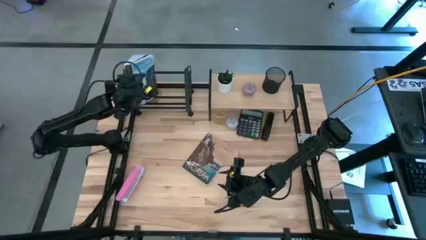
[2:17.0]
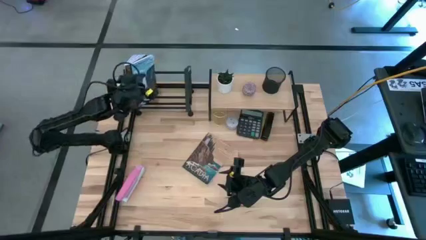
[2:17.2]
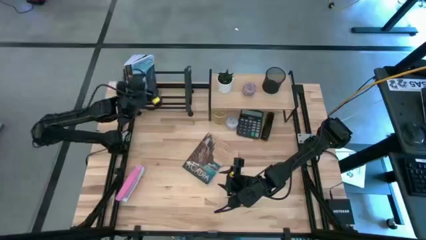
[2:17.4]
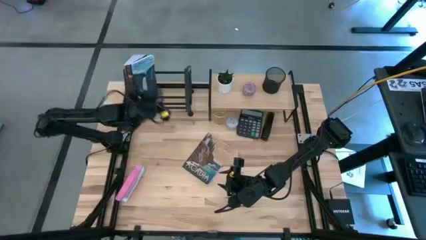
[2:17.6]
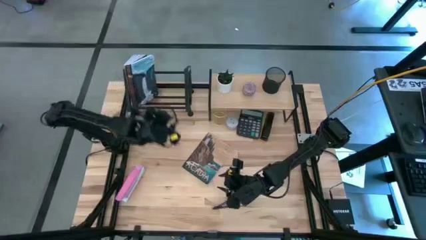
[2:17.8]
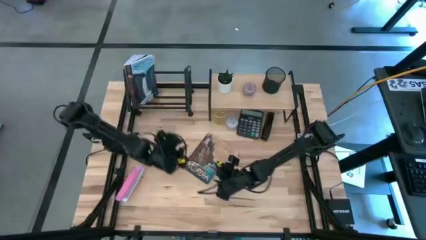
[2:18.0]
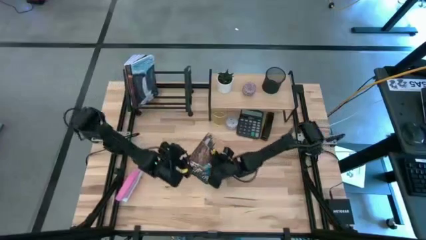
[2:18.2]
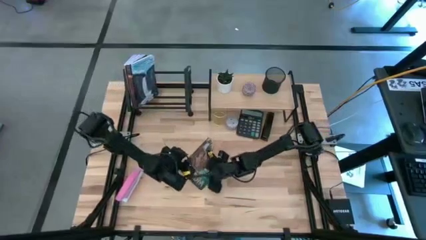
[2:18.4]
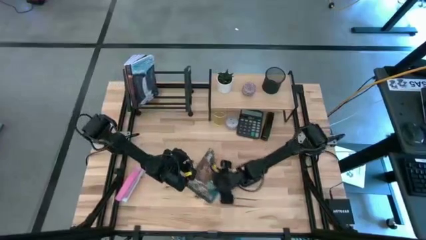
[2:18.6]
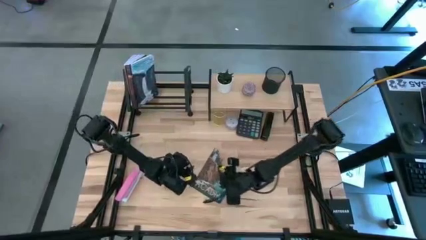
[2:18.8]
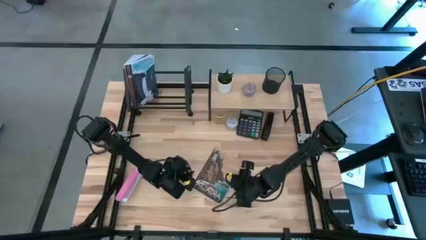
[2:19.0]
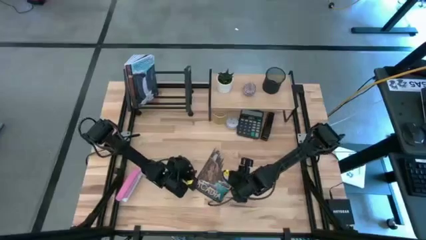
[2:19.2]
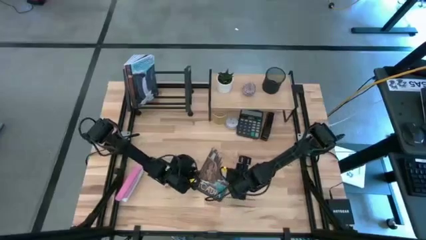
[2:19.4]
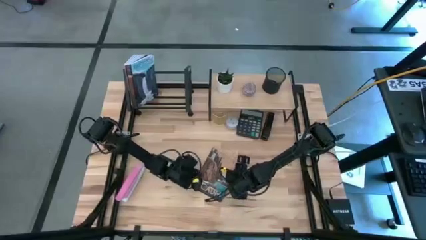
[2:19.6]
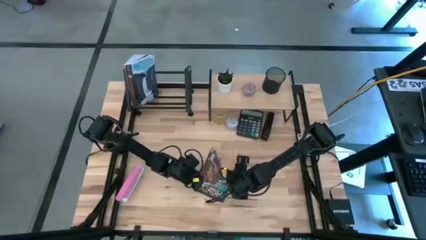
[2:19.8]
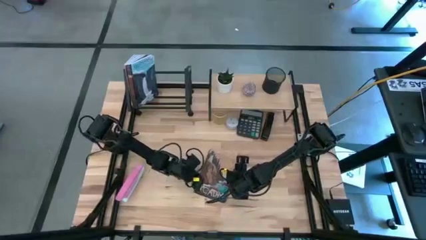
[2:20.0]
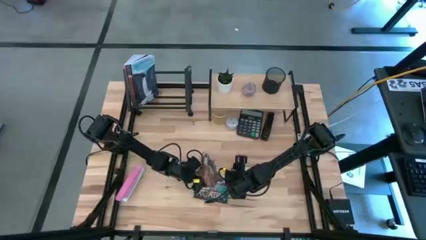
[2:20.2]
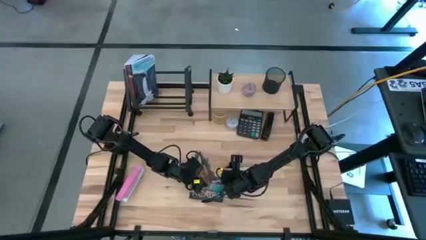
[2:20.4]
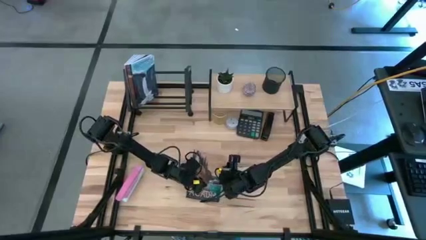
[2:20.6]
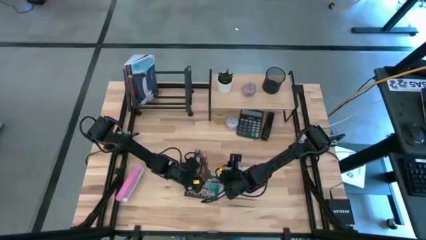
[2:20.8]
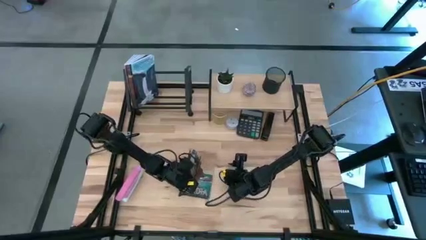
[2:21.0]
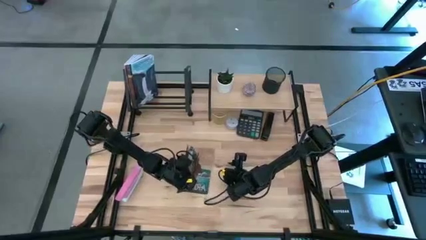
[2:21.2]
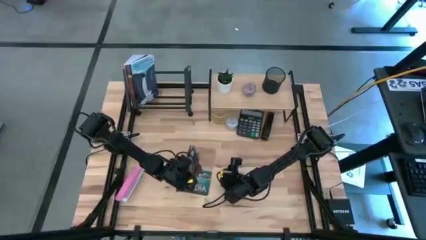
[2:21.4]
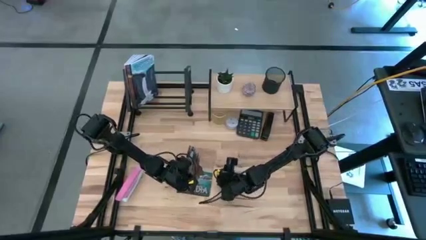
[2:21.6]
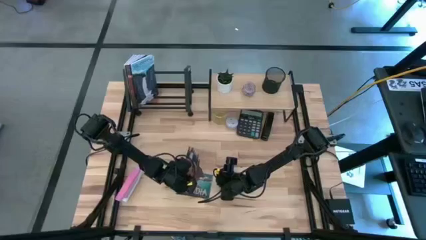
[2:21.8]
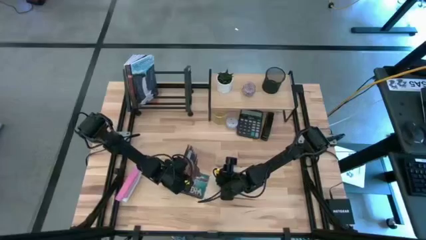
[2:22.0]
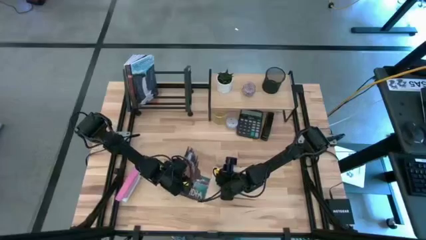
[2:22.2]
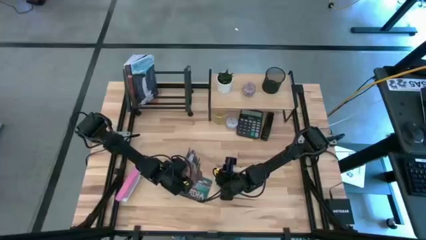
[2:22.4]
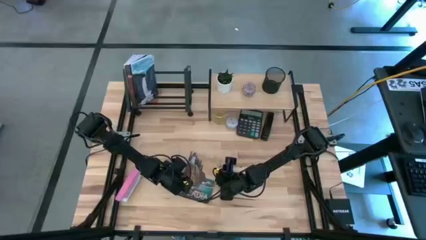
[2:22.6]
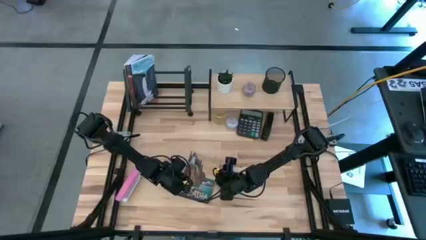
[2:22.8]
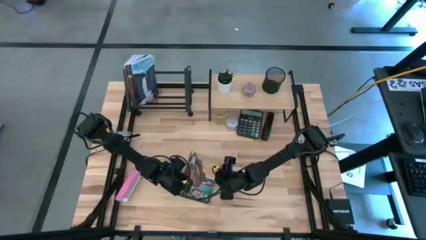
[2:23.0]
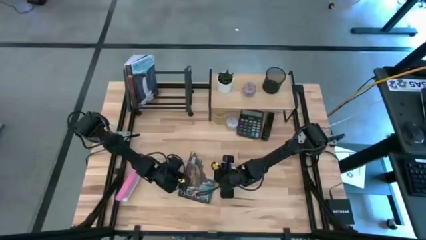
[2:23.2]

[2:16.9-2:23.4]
Task: Stock shelves
Put the brown book into the book holder

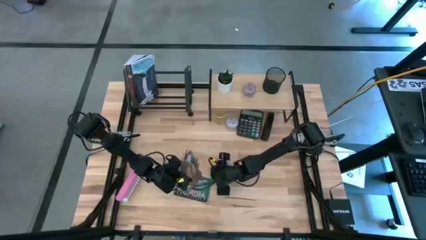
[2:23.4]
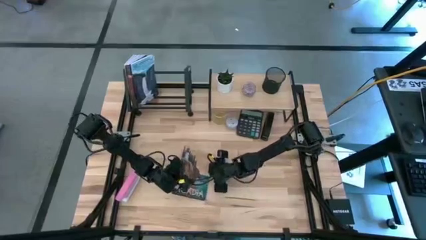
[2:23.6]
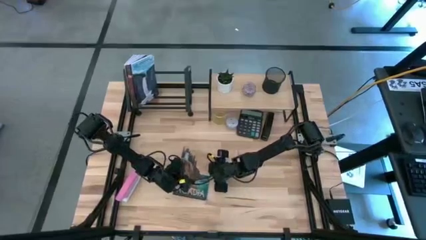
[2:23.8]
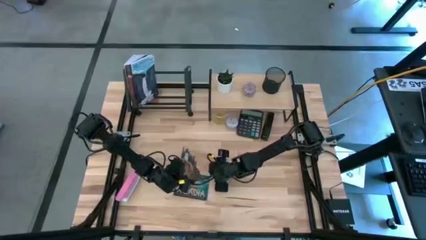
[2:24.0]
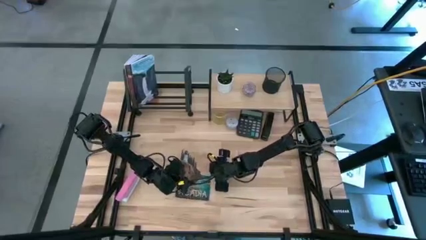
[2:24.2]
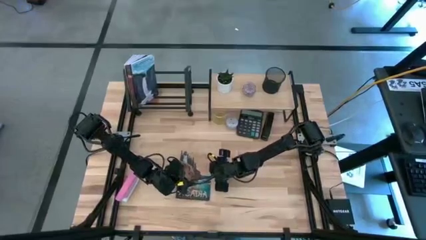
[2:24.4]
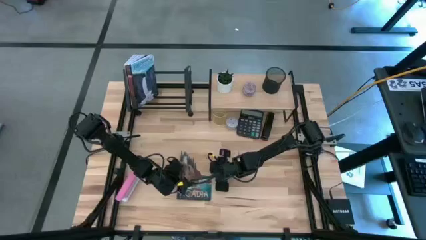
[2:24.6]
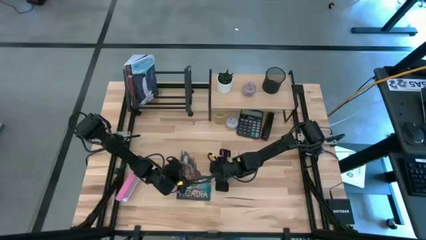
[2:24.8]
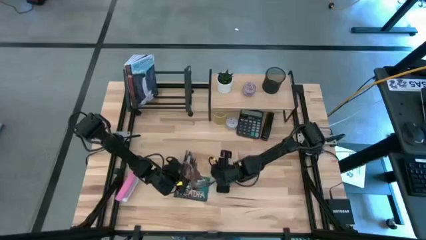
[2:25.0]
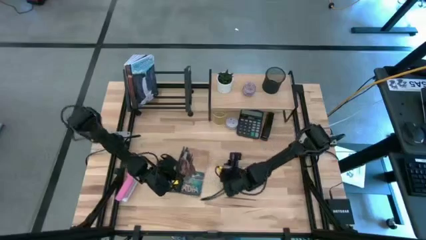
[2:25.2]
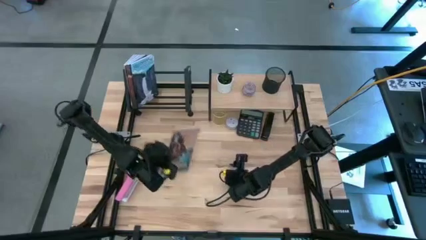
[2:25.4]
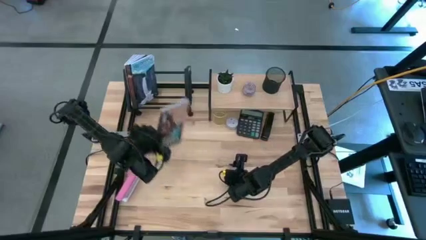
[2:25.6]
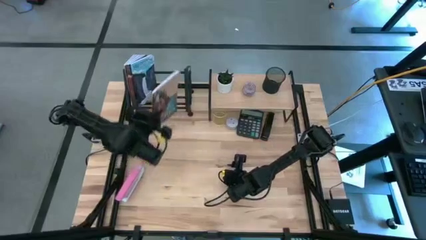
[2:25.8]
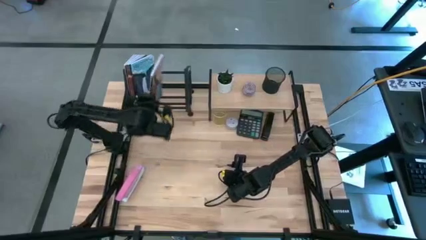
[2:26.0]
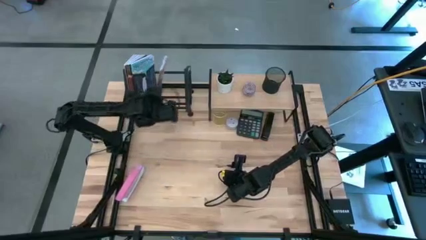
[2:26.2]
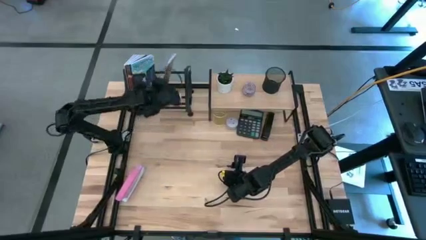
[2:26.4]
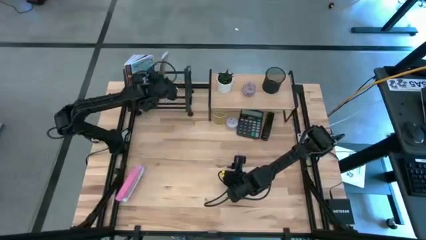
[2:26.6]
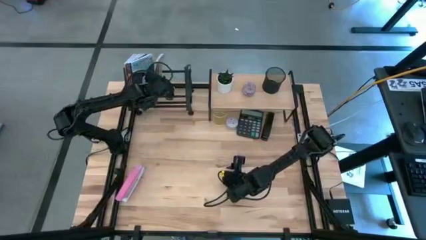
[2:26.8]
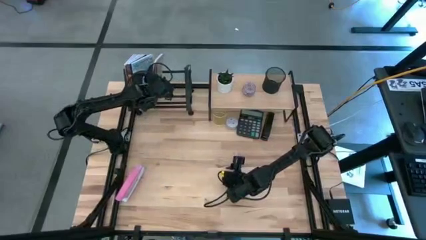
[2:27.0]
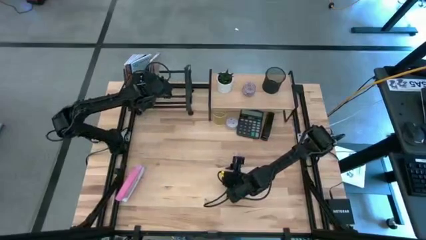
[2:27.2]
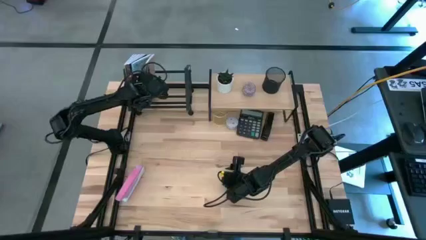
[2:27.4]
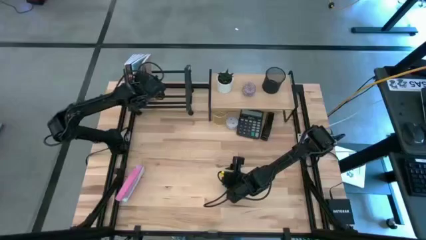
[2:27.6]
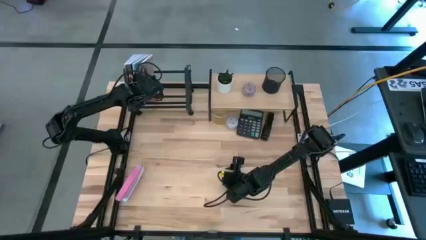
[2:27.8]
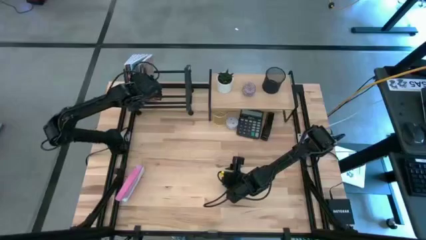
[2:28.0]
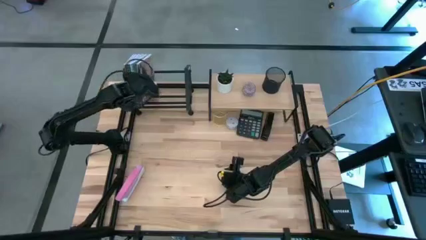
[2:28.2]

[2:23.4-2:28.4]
Put the brown book into the book holder

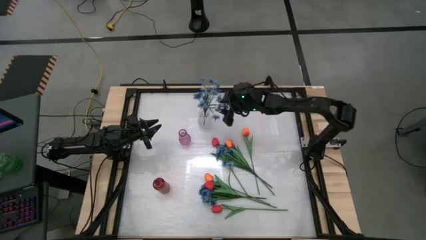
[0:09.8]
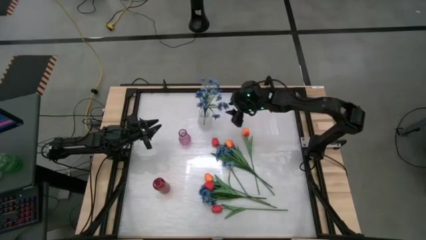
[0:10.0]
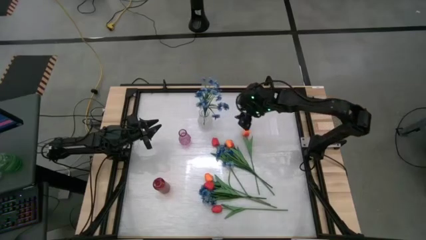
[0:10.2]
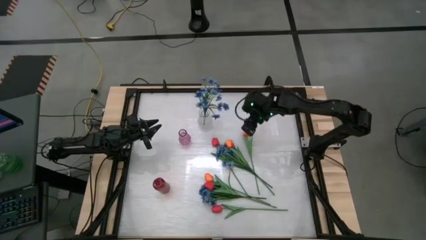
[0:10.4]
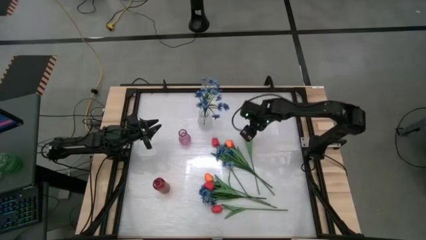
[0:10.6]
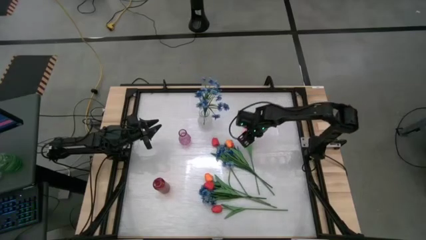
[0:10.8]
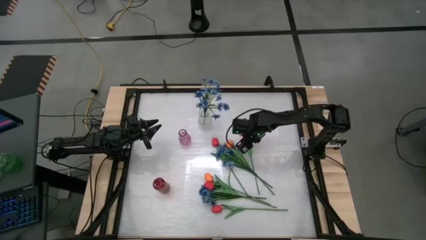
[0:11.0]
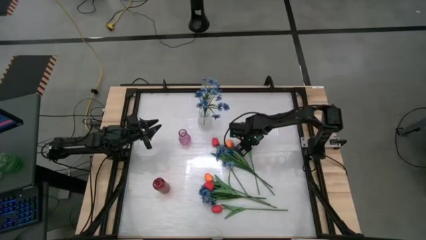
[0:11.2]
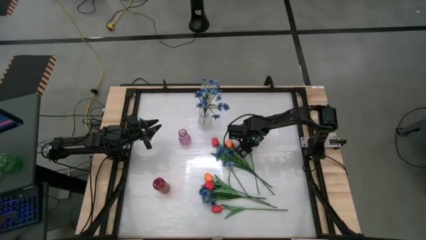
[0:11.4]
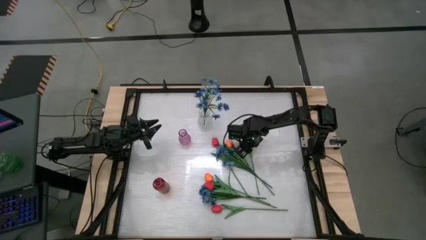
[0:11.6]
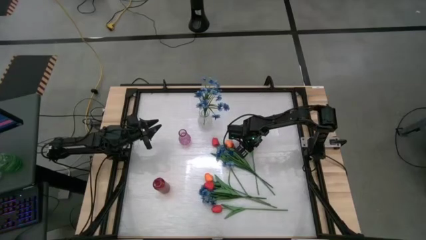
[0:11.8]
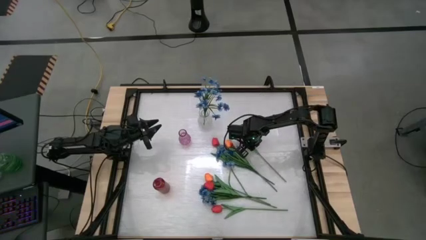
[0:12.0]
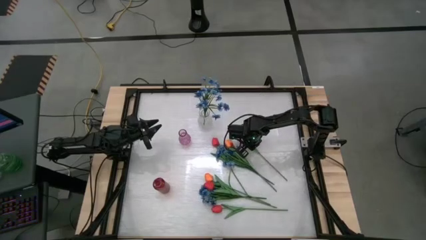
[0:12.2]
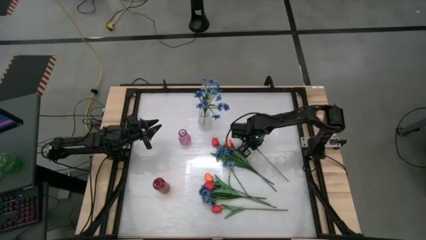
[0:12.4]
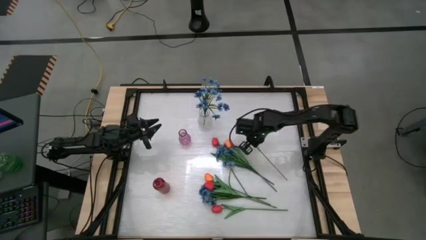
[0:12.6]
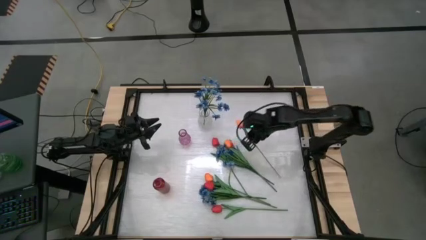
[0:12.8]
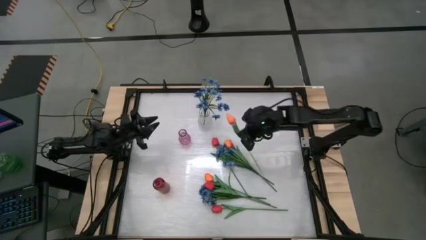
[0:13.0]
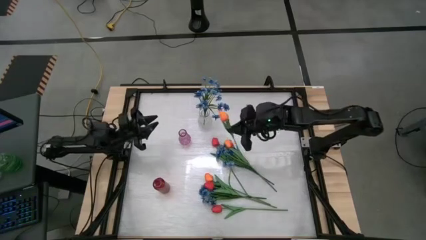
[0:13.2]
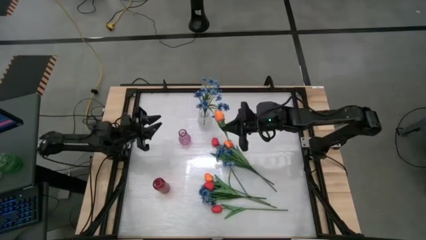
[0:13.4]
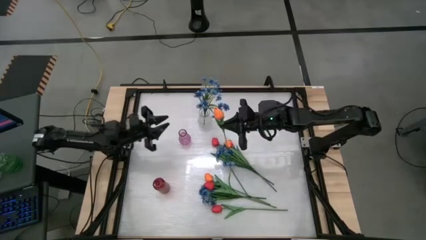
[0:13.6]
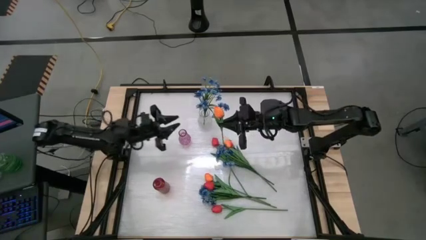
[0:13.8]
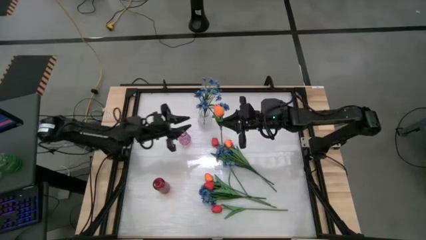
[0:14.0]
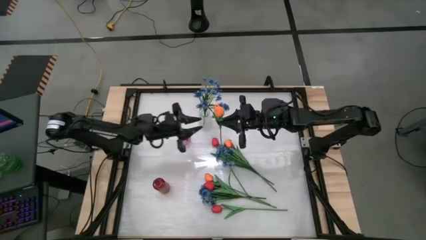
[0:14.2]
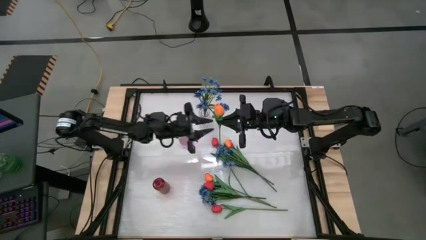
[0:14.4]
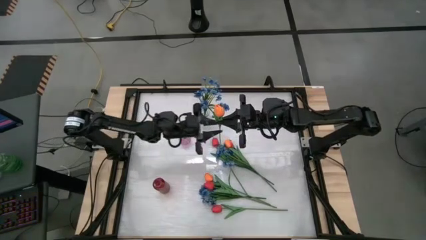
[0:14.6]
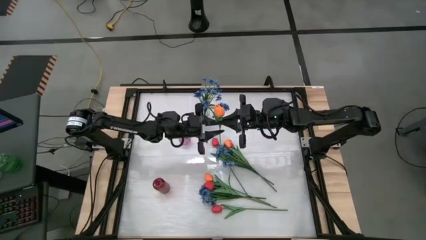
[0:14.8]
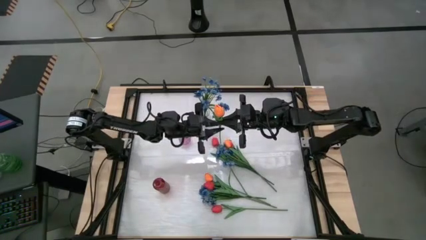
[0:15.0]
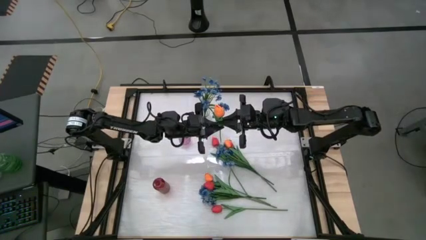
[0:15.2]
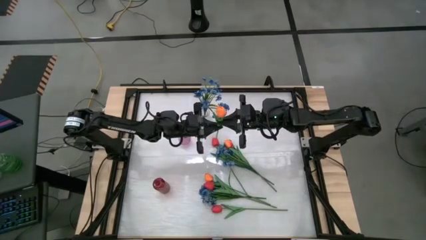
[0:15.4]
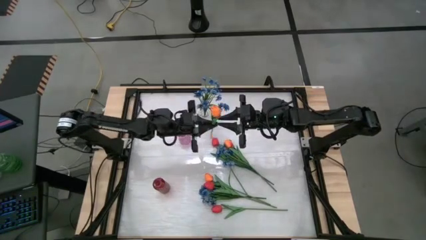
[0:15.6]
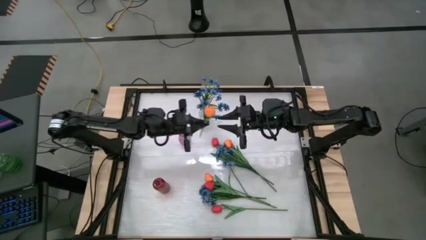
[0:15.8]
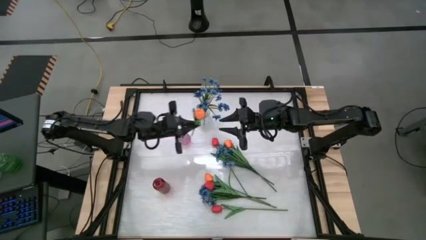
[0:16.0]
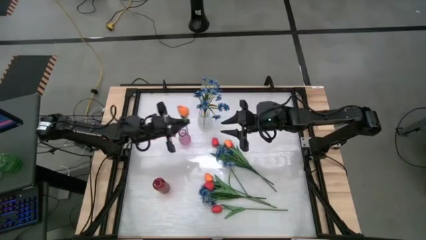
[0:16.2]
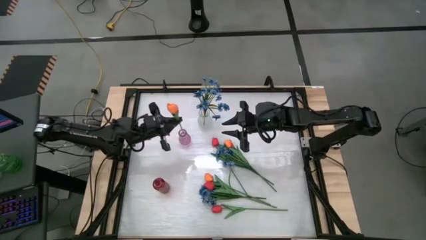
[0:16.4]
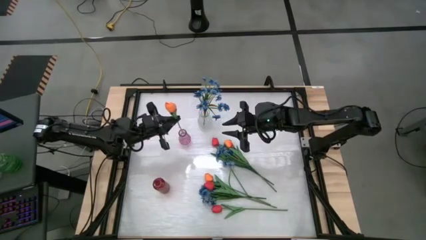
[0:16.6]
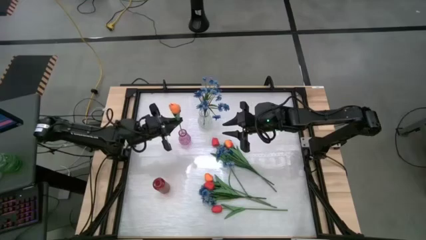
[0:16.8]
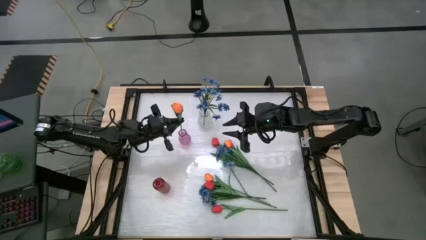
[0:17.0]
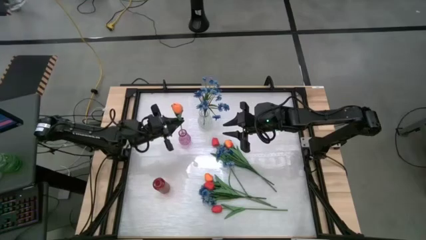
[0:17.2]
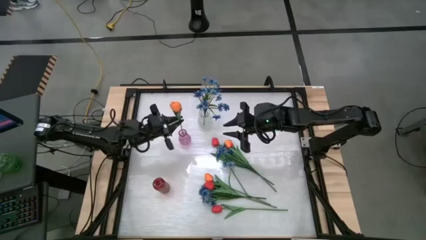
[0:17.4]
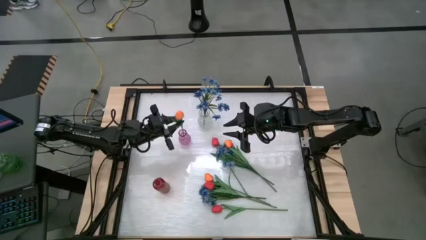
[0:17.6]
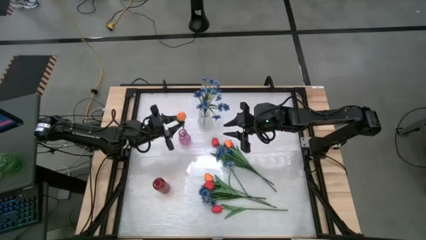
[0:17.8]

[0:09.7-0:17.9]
Task: Sort flowers into vase by color
Put the top right orange tulip into the purple vase
